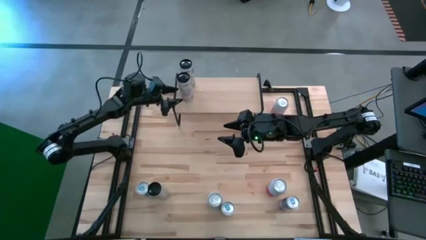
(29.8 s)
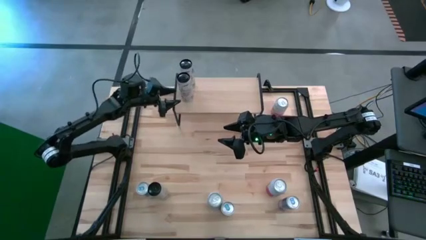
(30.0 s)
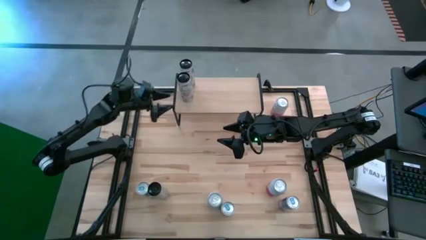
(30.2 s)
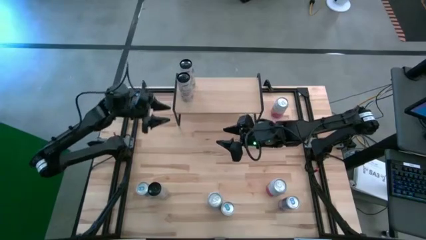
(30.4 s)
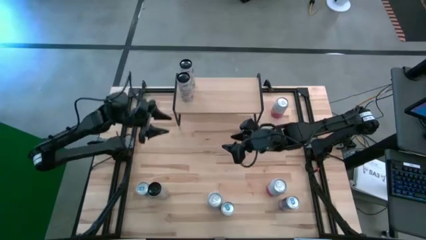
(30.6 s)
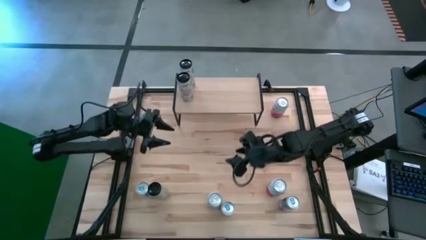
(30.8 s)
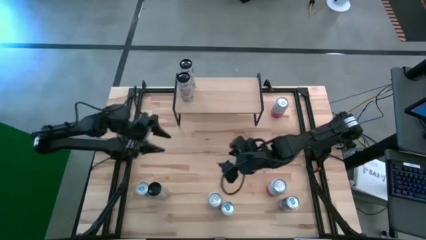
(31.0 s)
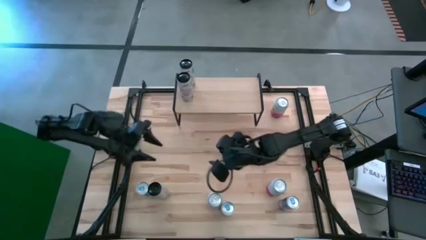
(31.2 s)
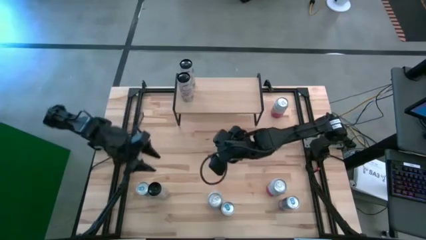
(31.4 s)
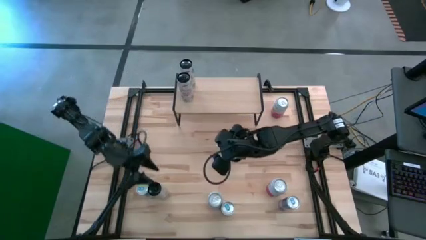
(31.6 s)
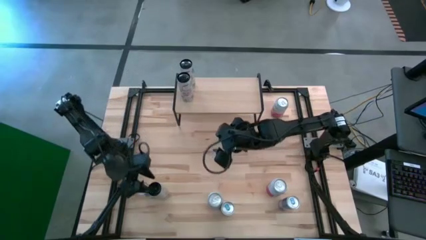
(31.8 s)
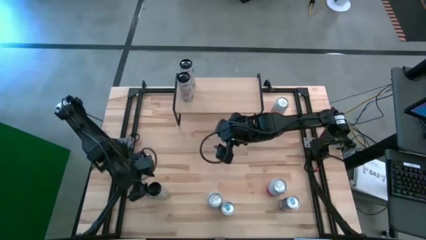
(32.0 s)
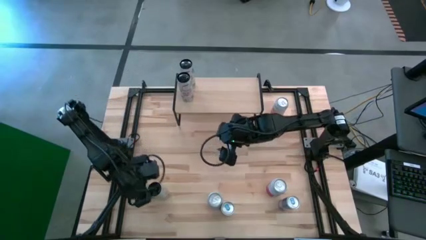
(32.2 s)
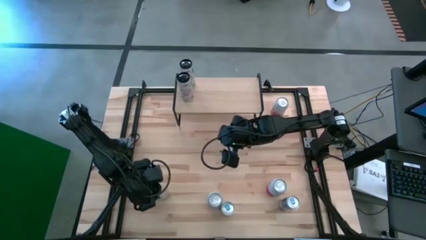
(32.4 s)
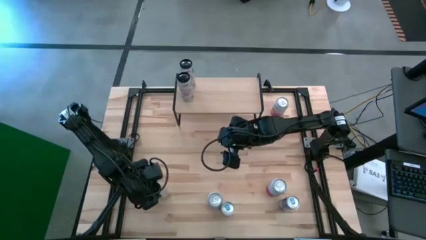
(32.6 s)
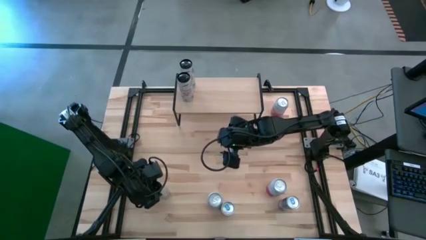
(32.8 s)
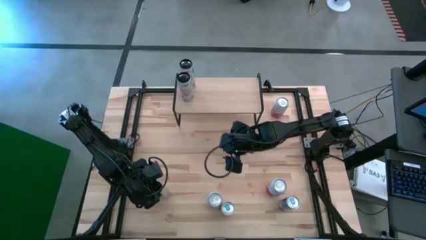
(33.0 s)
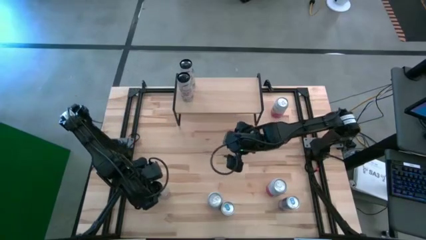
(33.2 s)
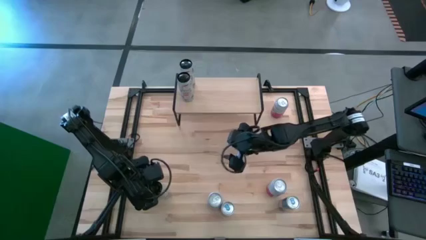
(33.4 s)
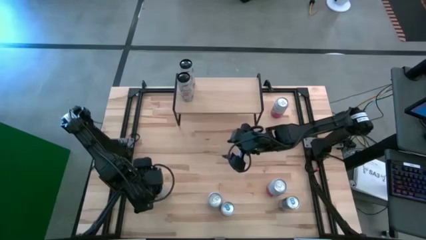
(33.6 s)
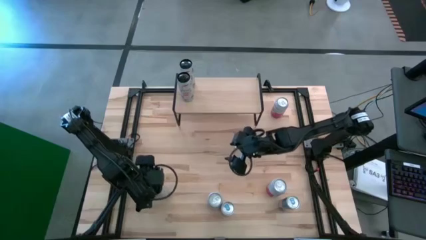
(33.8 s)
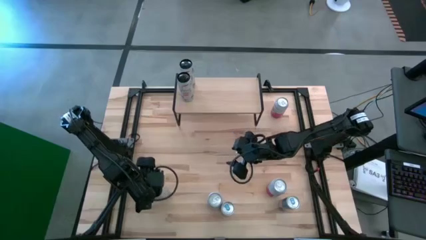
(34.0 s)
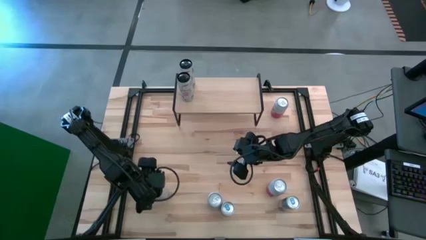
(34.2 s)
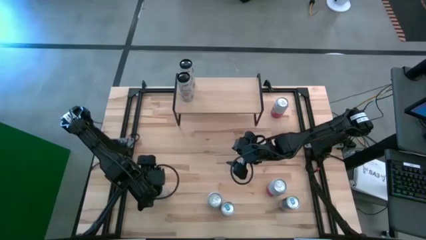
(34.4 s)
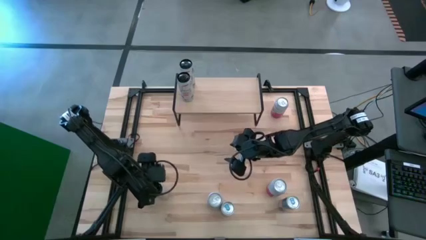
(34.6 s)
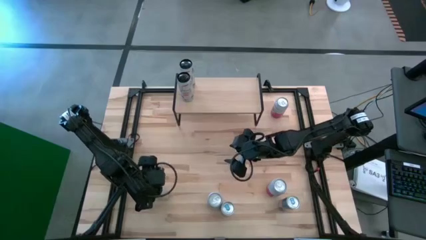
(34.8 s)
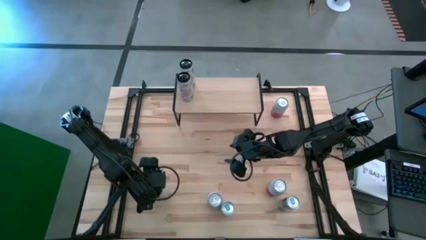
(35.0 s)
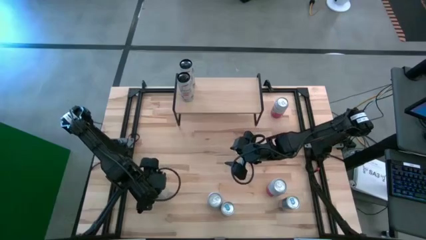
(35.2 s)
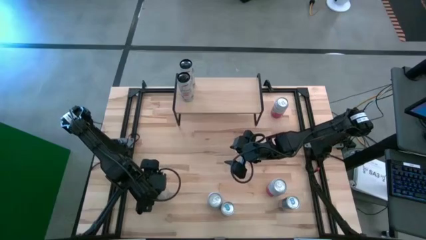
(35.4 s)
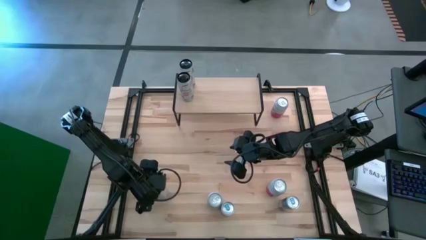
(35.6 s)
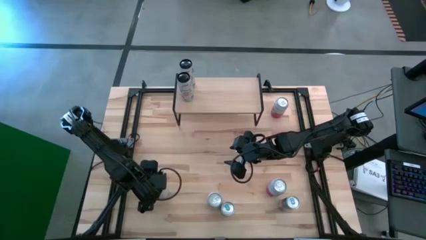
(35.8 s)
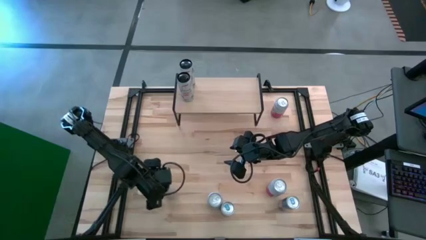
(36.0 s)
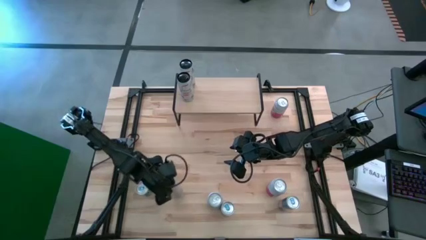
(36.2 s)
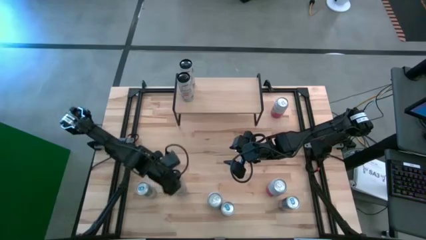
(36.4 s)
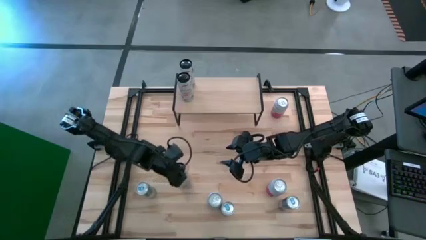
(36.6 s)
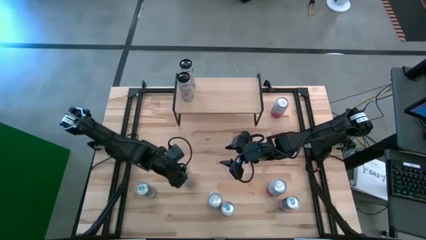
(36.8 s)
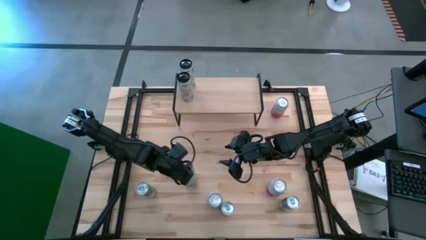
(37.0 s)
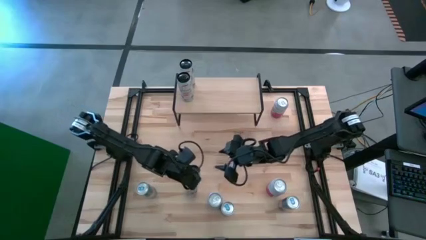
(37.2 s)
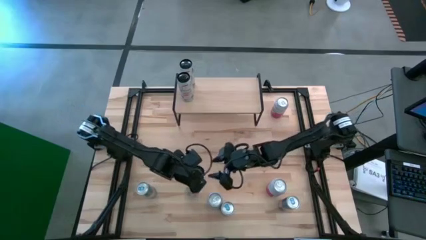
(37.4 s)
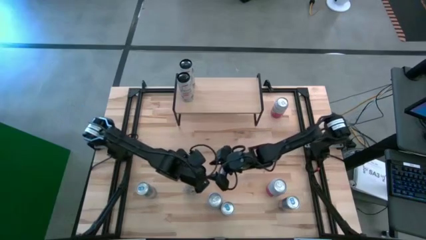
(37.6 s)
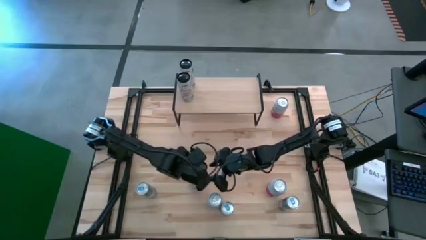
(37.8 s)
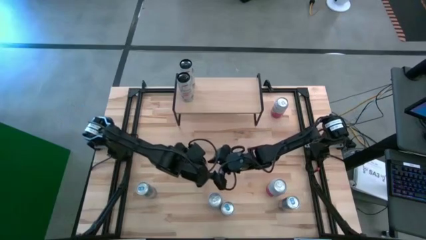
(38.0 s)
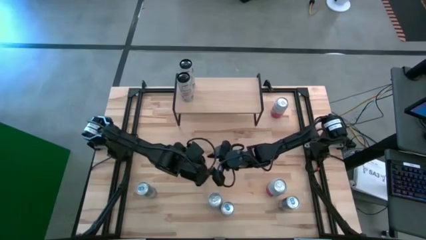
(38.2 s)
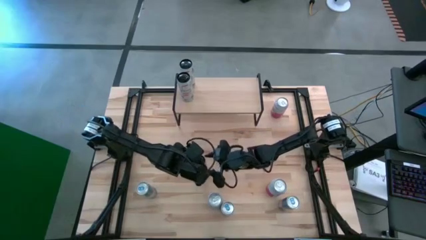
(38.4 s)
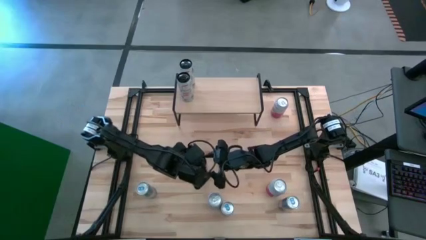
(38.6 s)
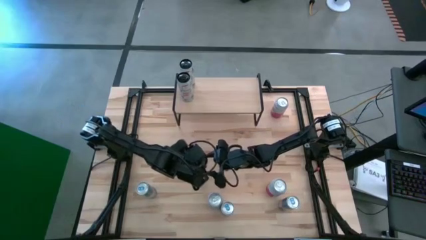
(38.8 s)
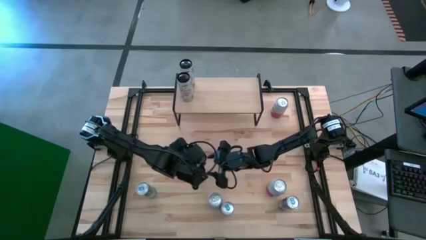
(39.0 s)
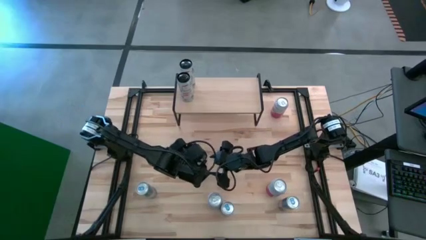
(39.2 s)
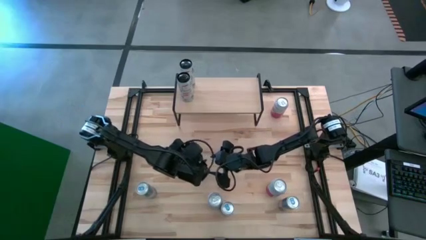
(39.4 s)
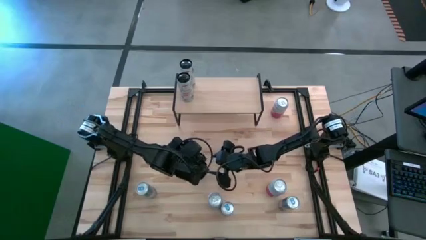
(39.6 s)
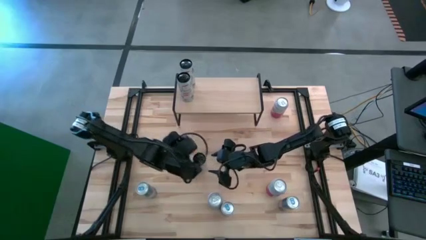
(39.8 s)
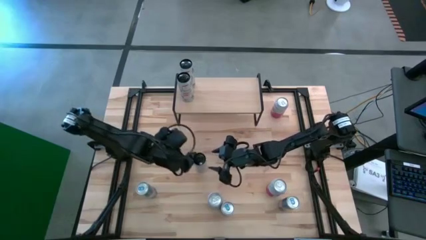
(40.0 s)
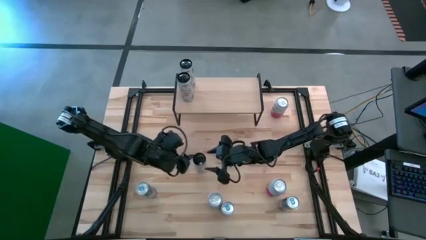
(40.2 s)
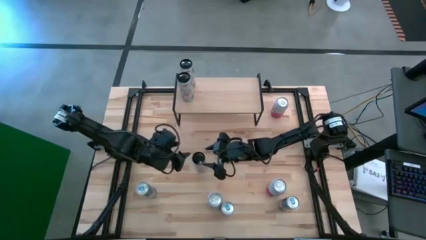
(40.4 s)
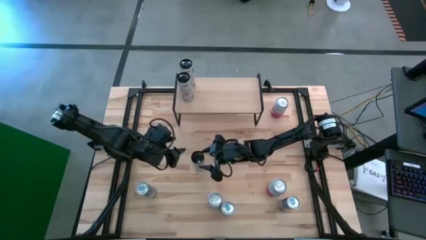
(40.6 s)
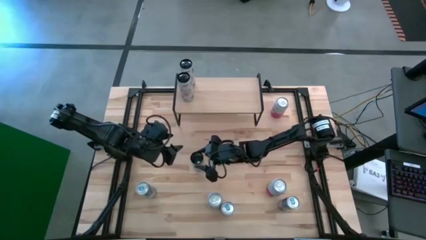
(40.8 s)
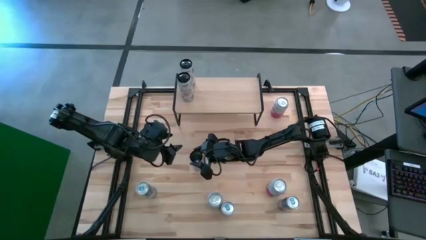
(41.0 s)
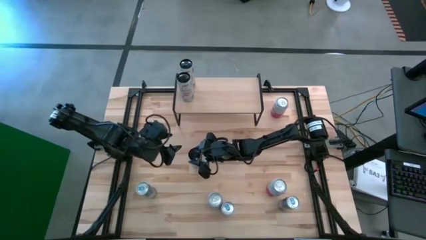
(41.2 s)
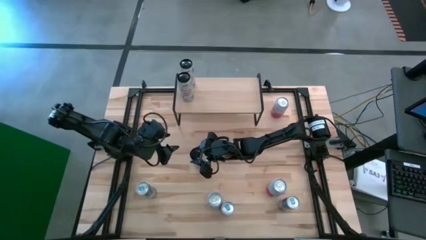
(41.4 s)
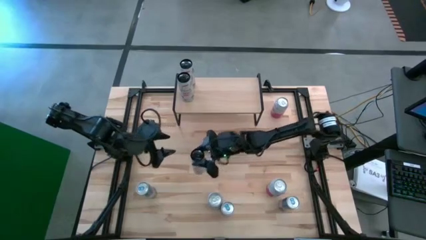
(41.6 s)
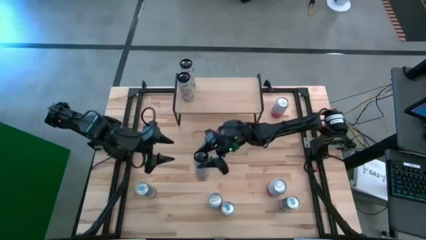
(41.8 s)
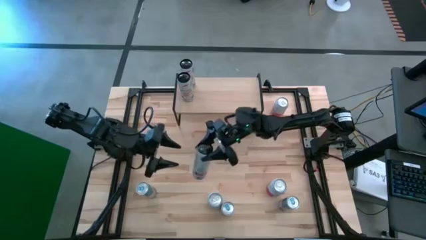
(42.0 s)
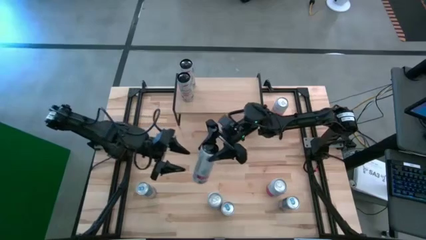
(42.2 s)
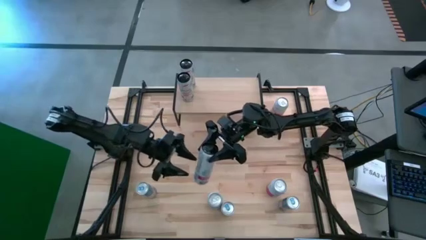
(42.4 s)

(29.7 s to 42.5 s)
Task: Place canned beverage on shelf
Put the white-pink soda can on the shelf aligned with the other white-pink soda cans
